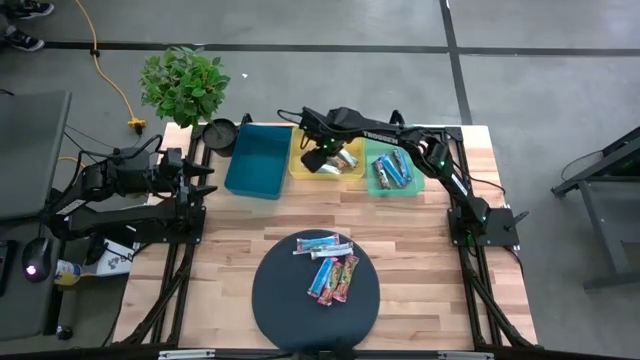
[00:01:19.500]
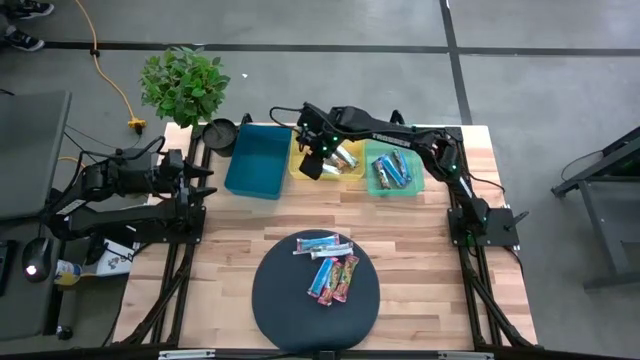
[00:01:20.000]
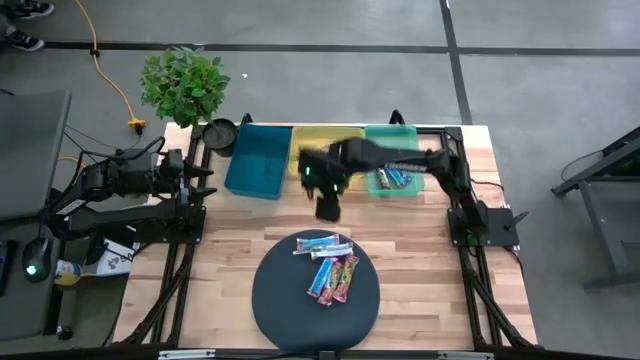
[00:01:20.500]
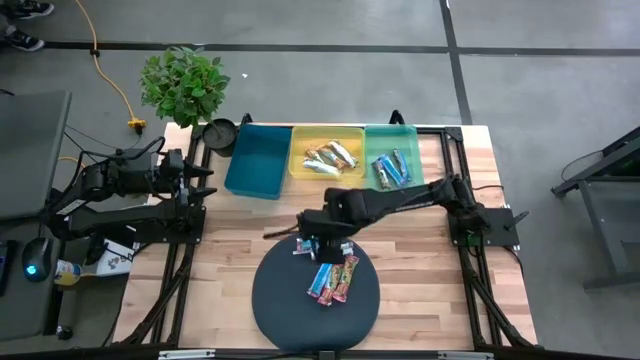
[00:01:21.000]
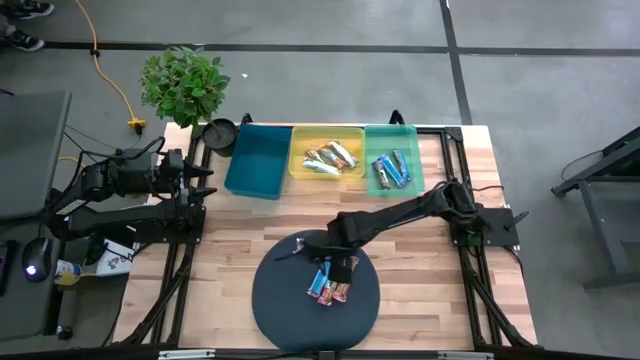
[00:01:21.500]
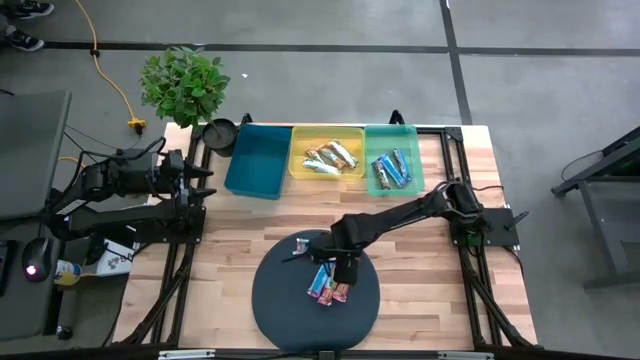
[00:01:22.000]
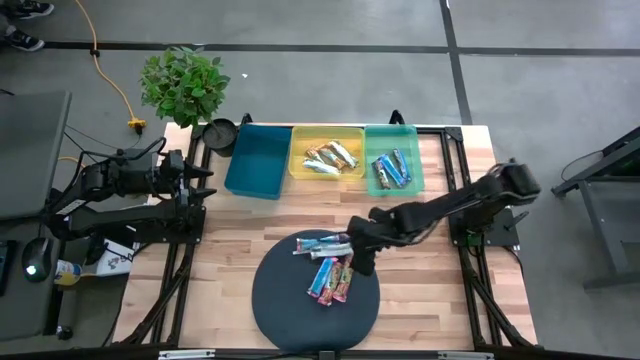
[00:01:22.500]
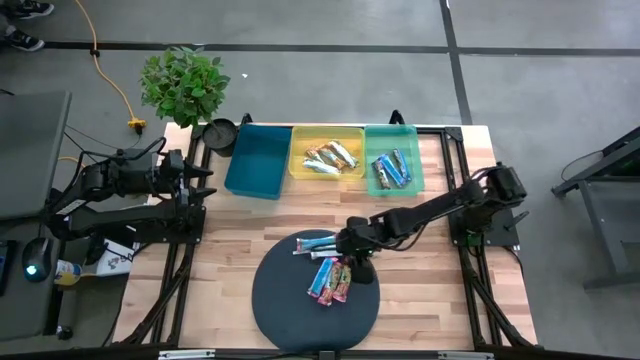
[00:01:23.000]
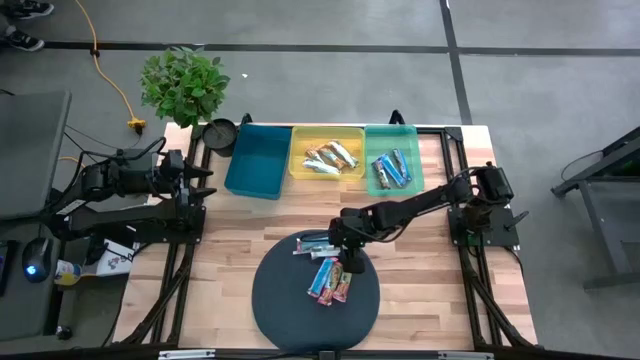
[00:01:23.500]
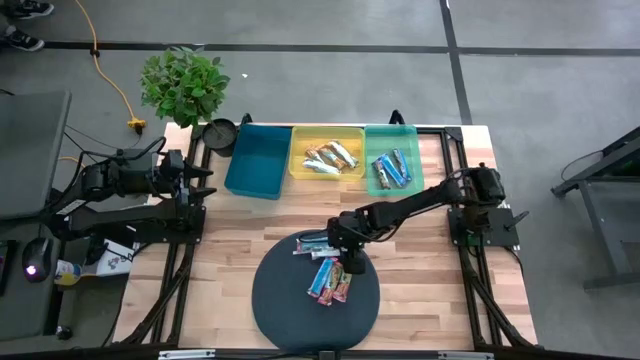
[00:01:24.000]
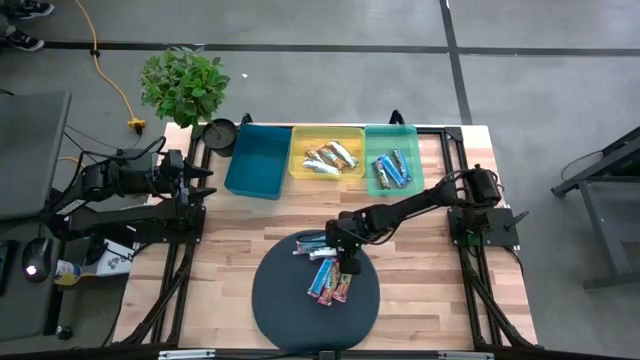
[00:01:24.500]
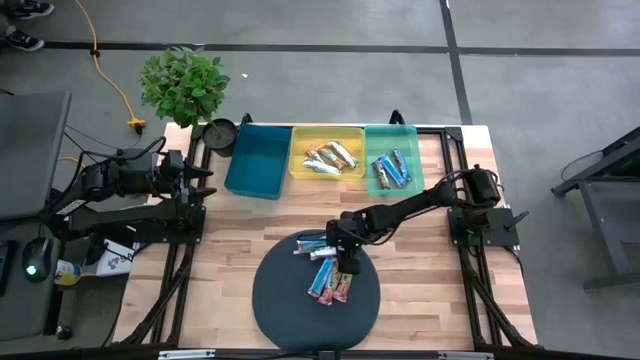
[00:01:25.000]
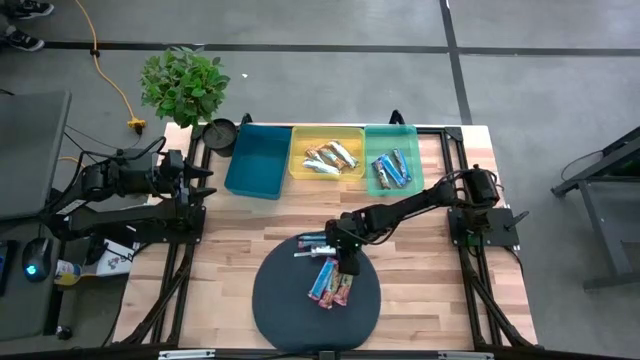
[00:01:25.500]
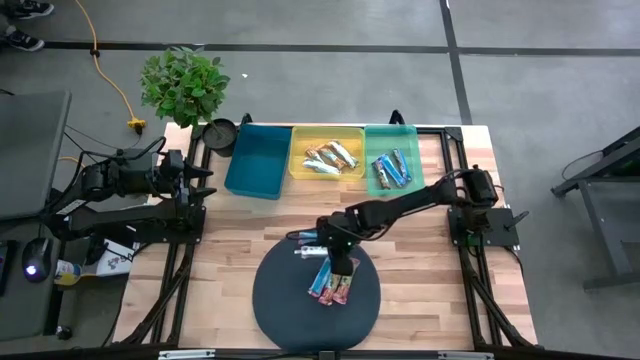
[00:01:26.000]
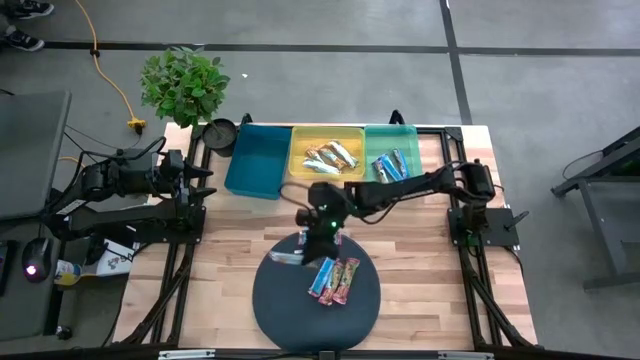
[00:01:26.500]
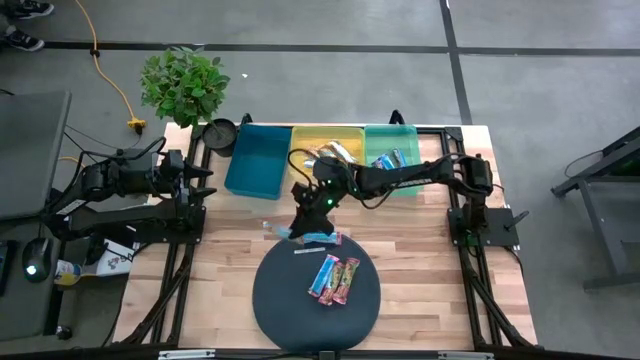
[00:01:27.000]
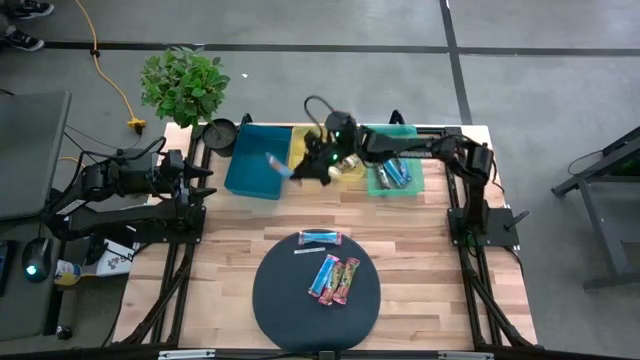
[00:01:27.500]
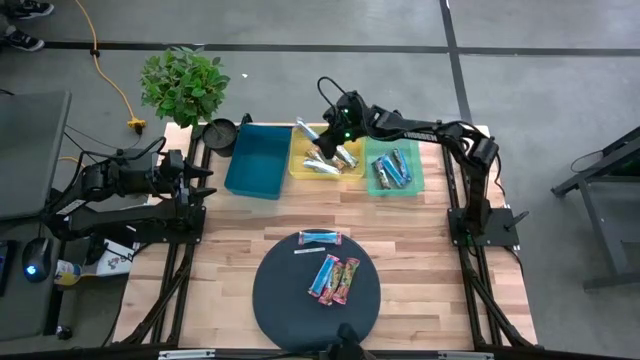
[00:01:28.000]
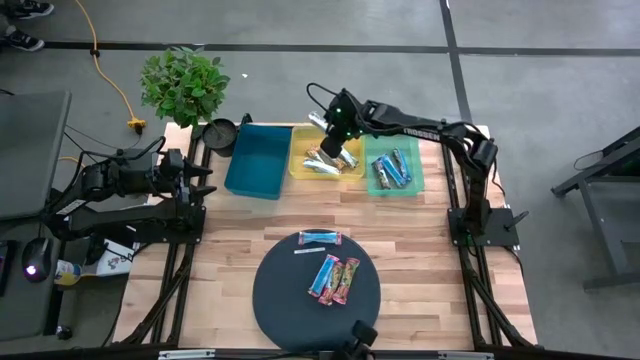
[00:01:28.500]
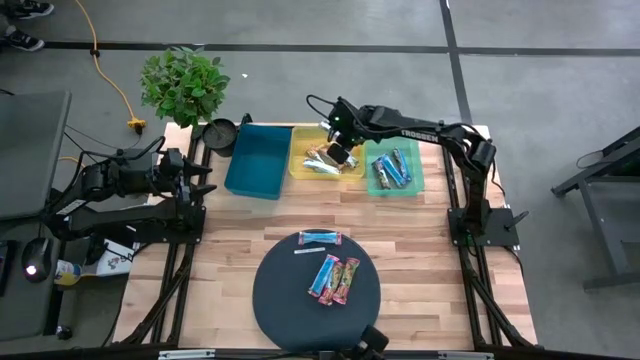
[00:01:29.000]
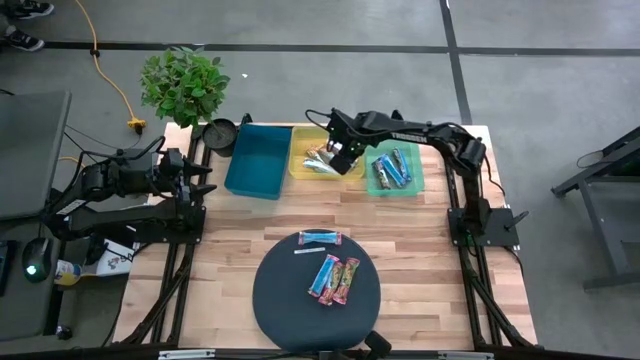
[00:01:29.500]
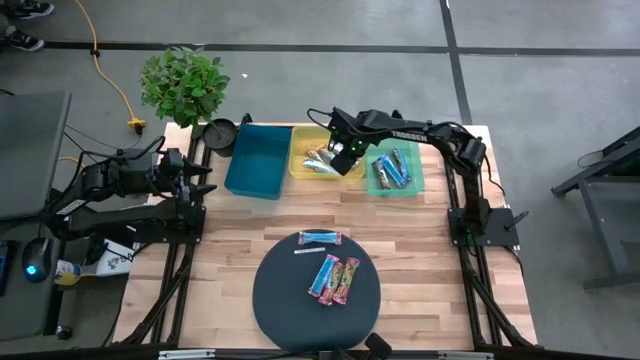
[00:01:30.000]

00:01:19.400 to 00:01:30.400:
Task: Pick and place Granola Bars by type
Put the yellow granola bar into the yellow bin

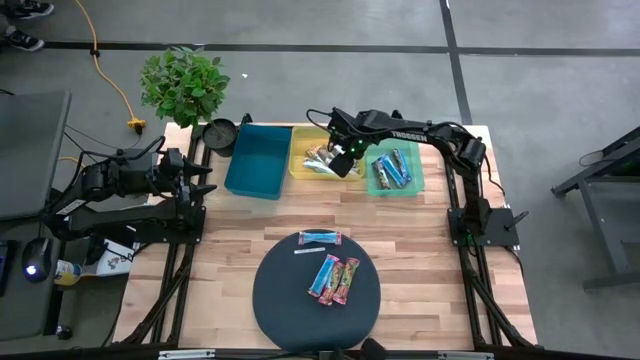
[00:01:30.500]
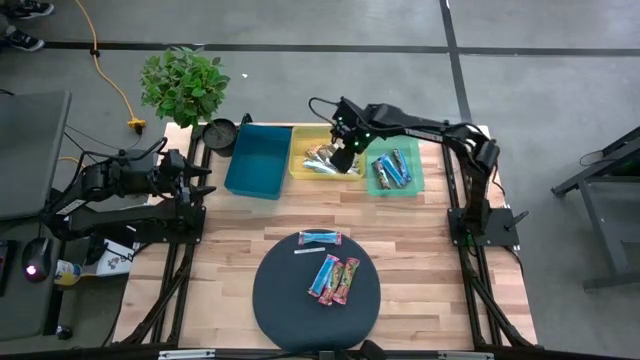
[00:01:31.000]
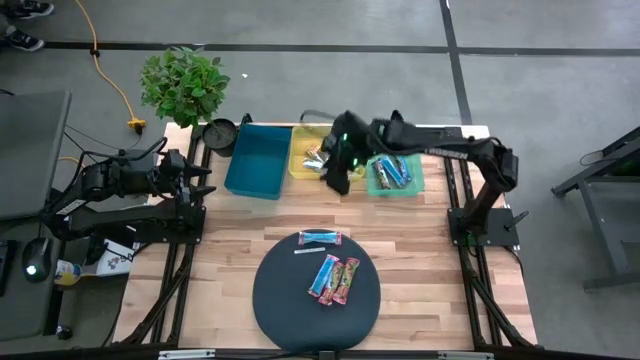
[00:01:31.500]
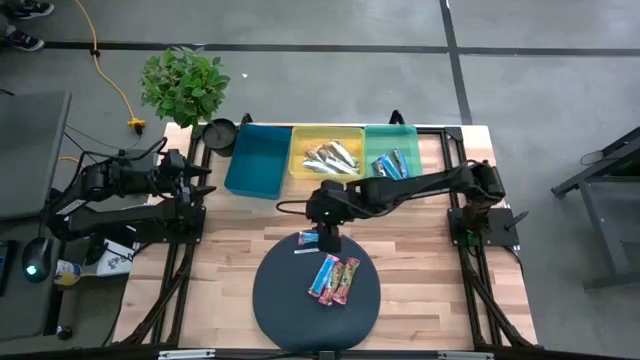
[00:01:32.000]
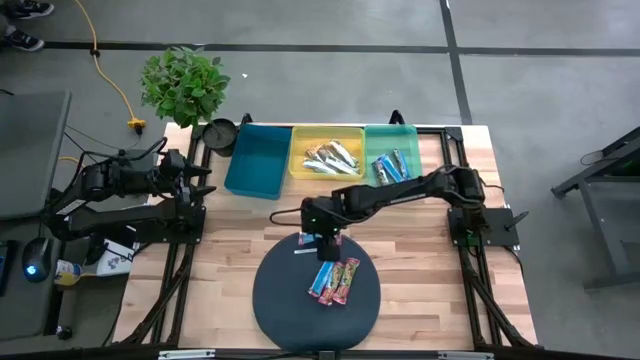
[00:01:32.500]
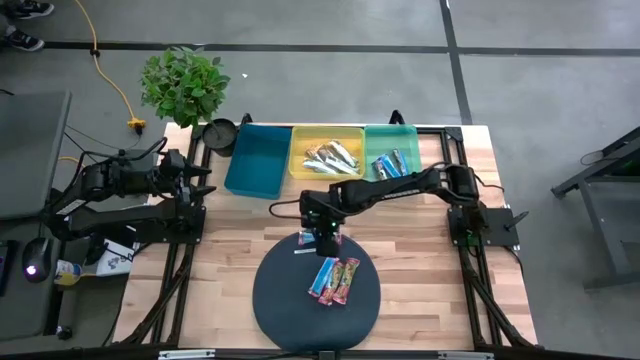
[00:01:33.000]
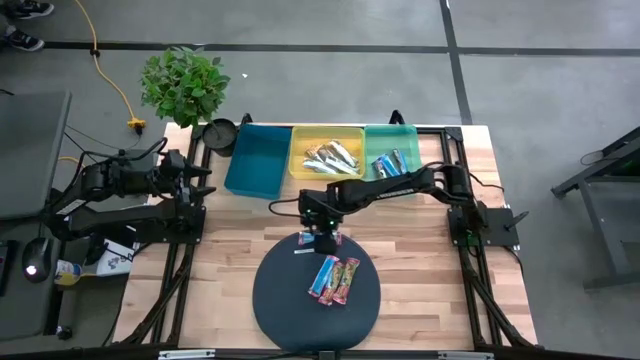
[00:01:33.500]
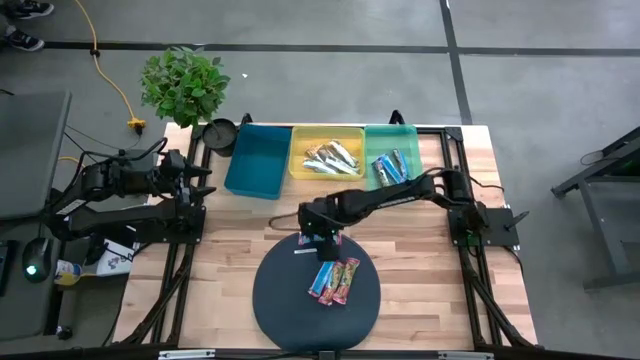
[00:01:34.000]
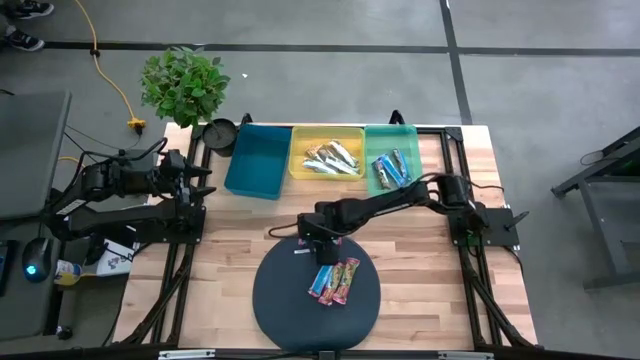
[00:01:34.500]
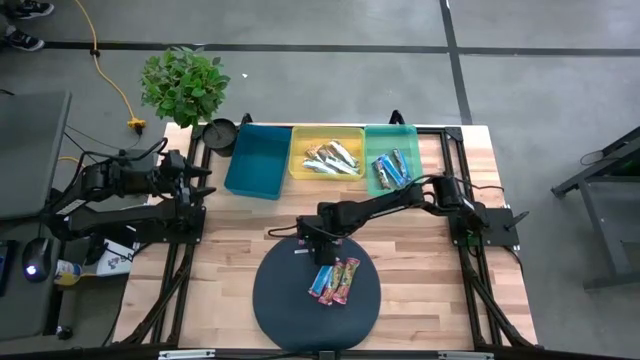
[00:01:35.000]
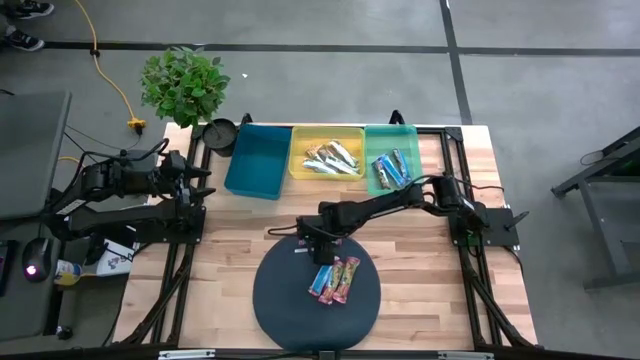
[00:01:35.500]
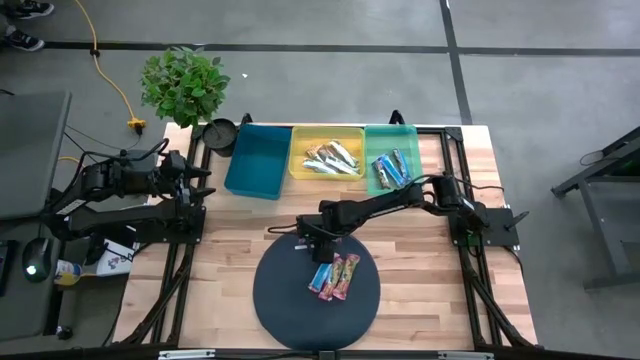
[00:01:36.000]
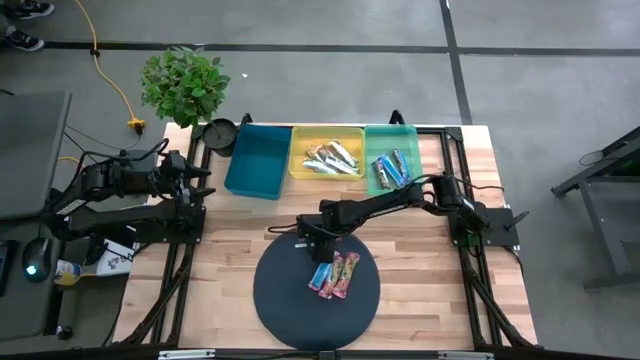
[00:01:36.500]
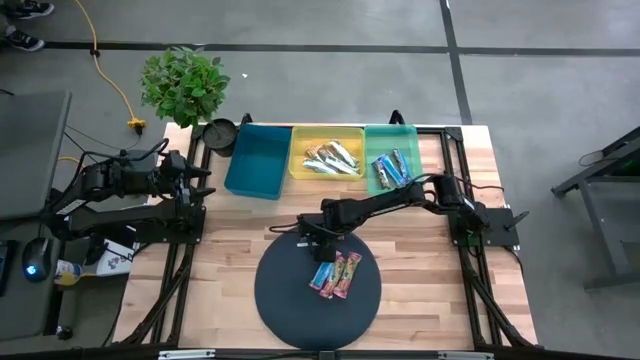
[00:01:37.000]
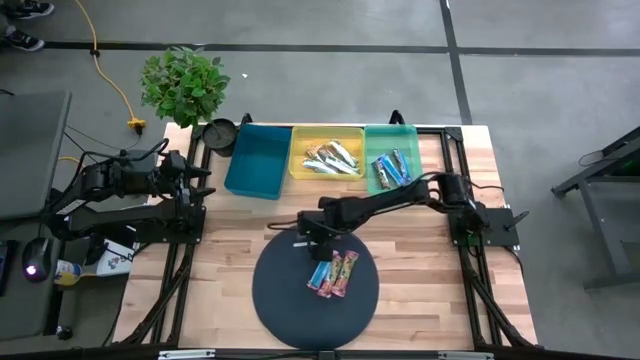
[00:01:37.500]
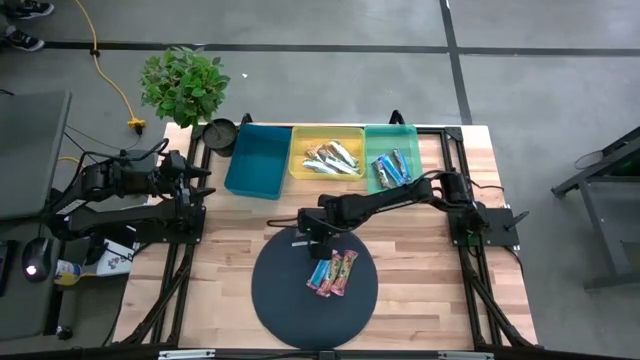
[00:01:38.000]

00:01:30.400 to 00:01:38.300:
Put the red granola bar into the blue bin

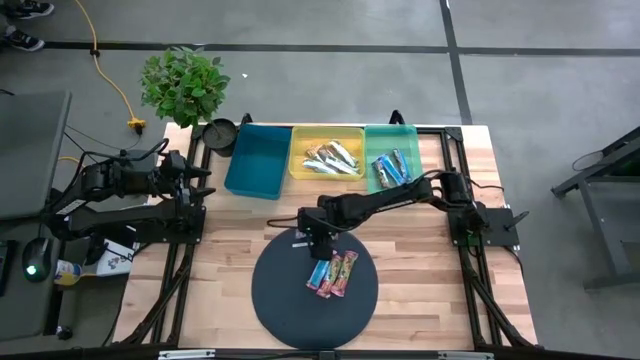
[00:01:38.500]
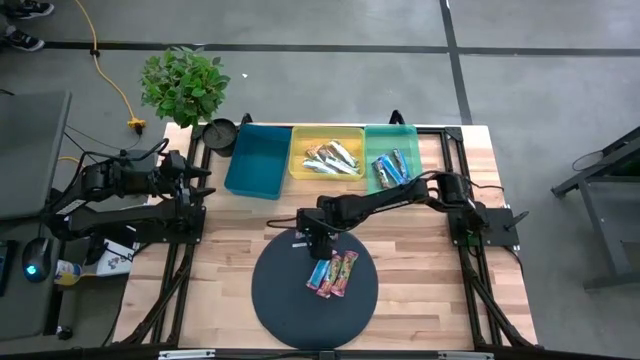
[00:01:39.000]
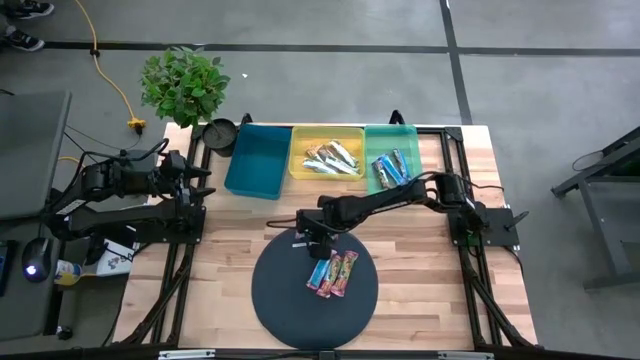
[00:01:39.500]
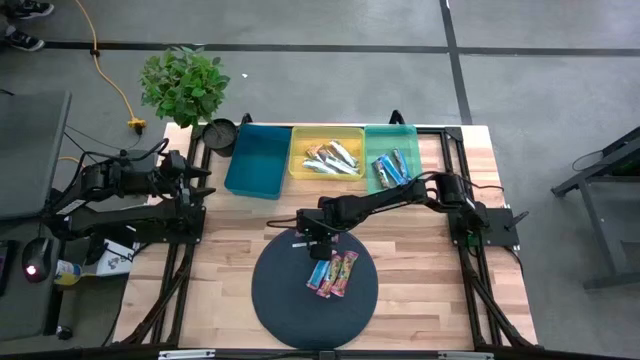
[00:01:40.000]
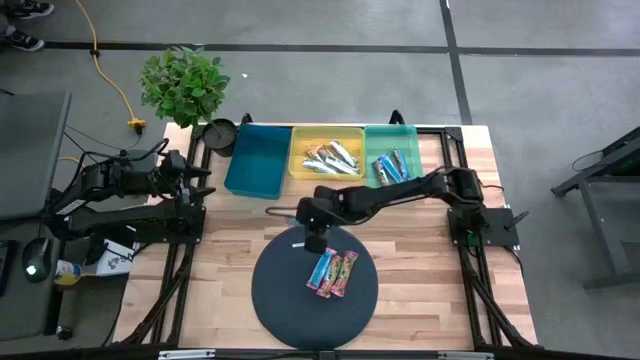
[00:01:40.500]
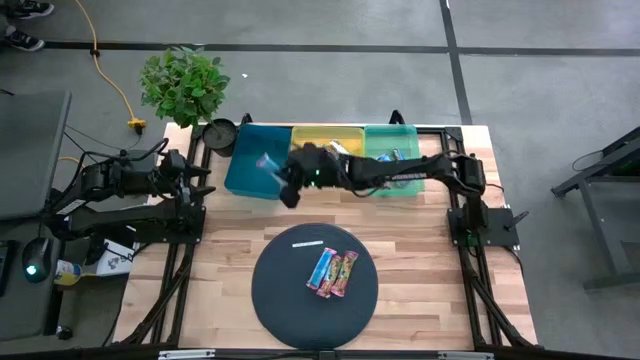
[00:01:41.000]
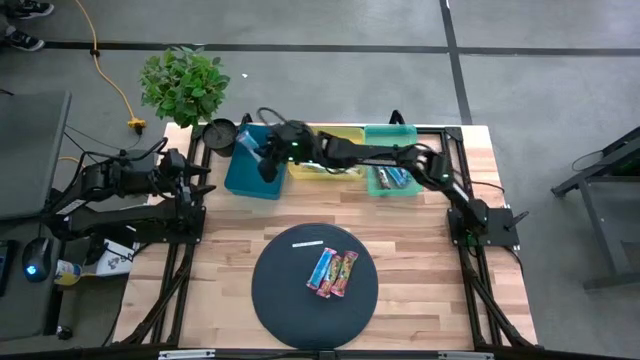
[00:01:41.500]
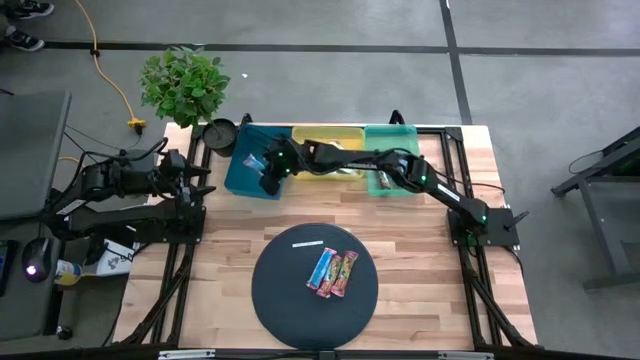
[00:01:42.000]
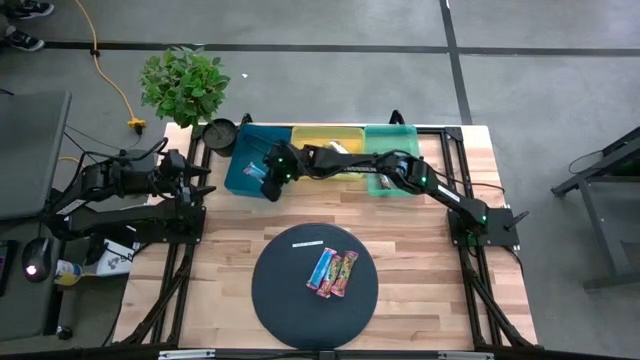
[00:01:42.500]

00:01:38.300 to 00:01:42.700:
Put the red granola bar into the blue bin
